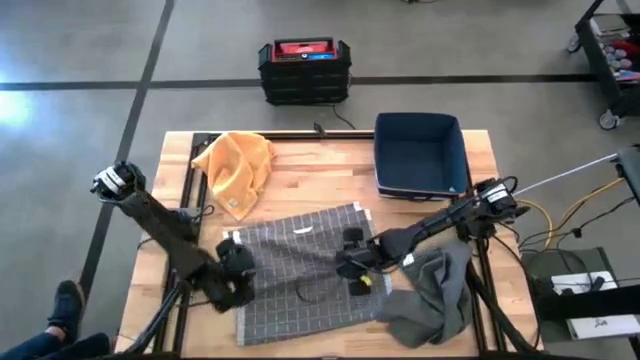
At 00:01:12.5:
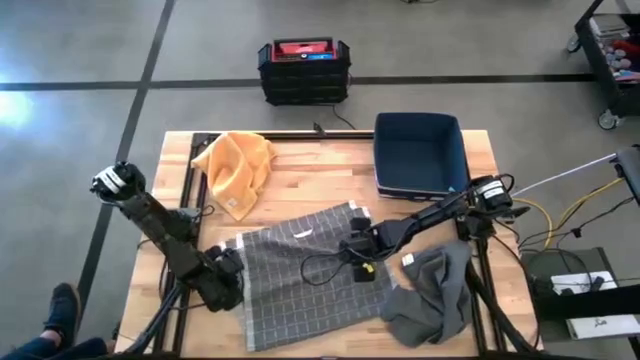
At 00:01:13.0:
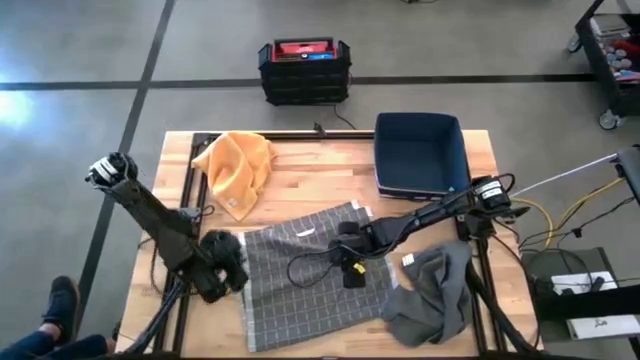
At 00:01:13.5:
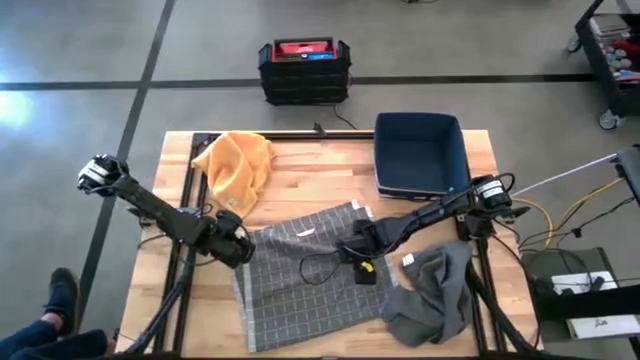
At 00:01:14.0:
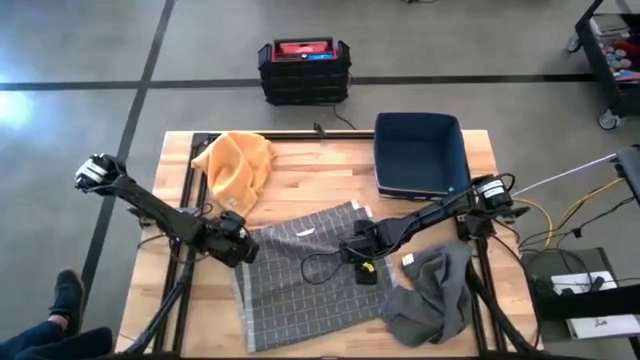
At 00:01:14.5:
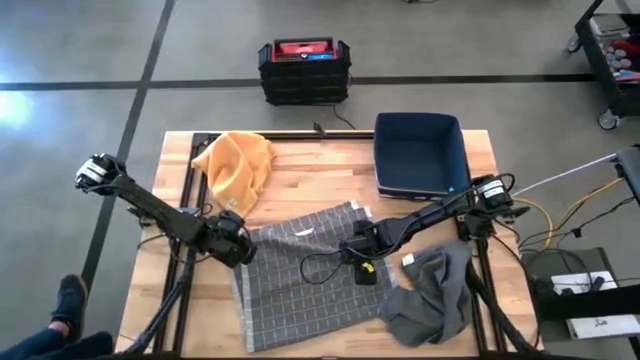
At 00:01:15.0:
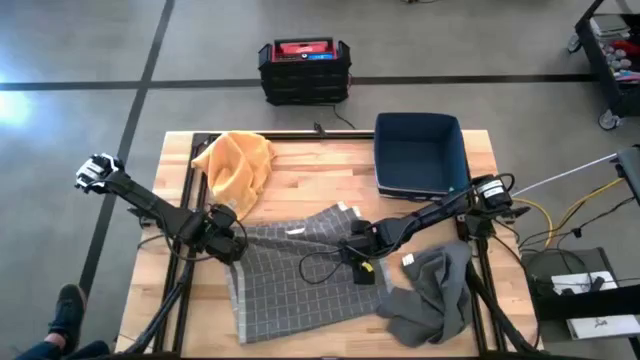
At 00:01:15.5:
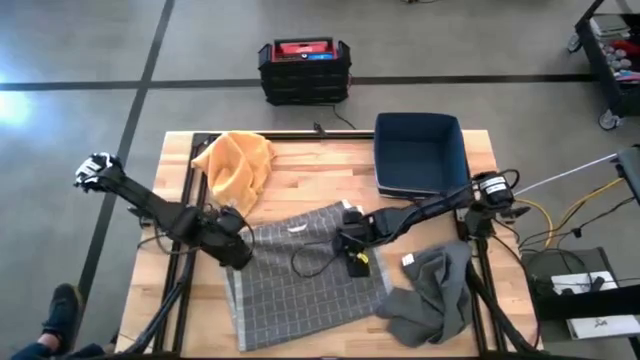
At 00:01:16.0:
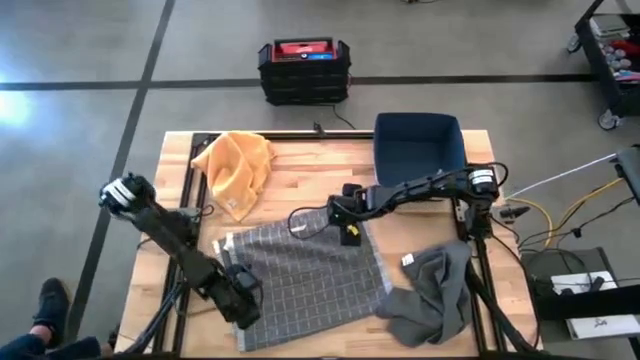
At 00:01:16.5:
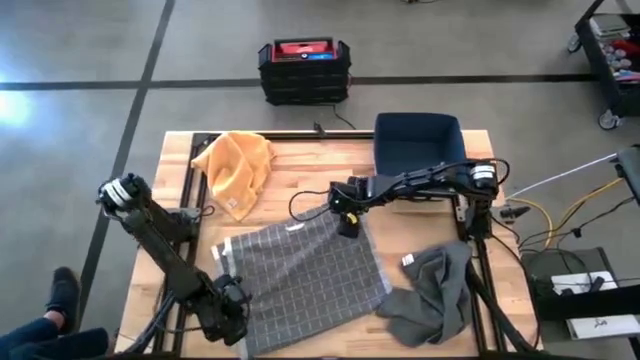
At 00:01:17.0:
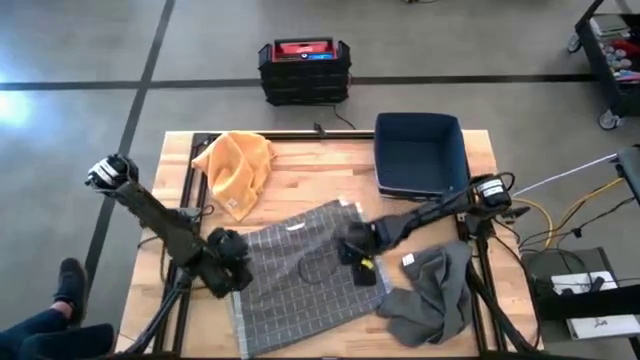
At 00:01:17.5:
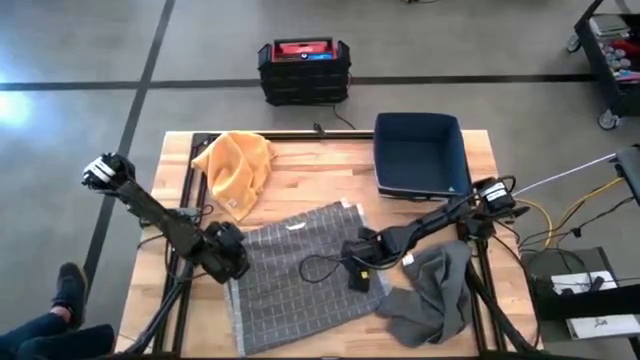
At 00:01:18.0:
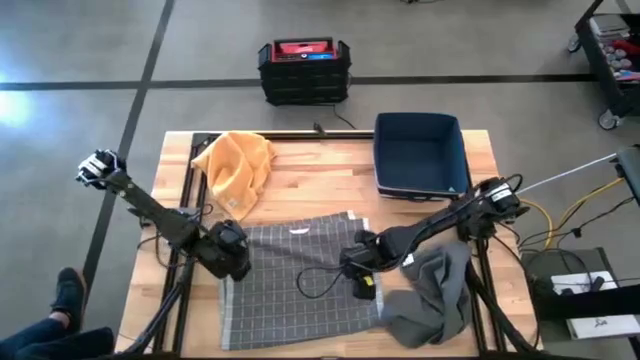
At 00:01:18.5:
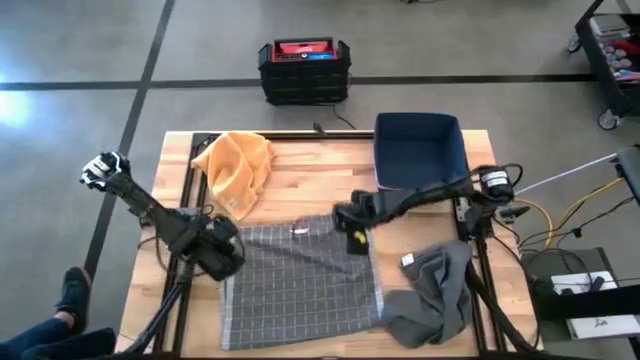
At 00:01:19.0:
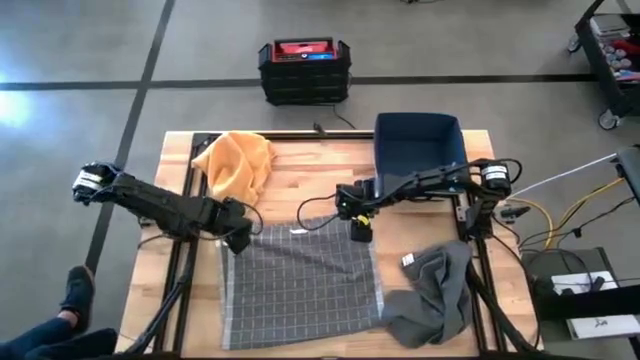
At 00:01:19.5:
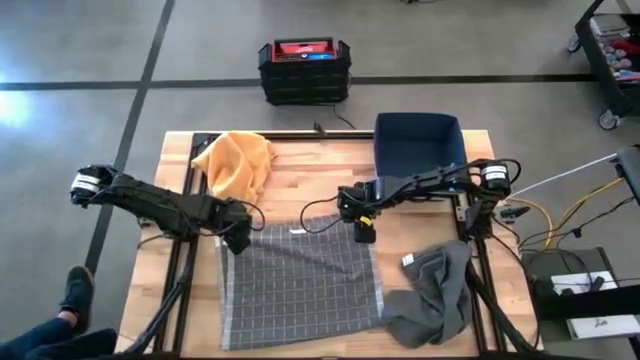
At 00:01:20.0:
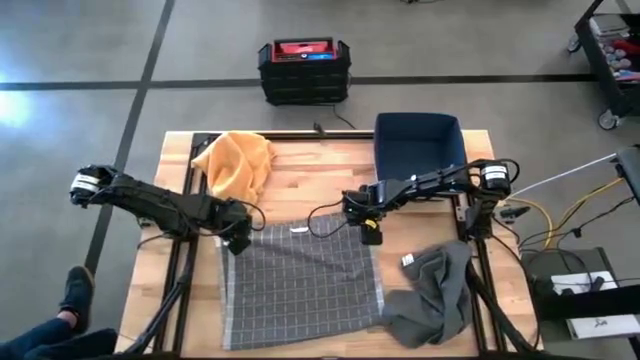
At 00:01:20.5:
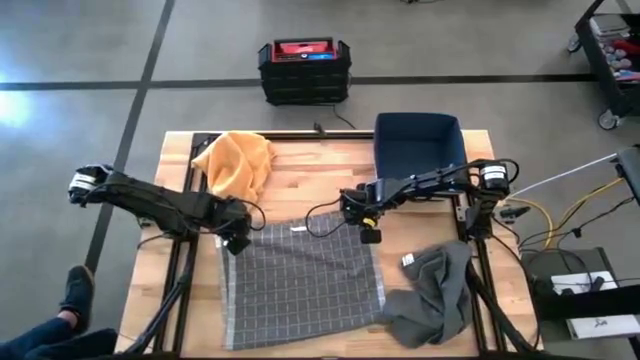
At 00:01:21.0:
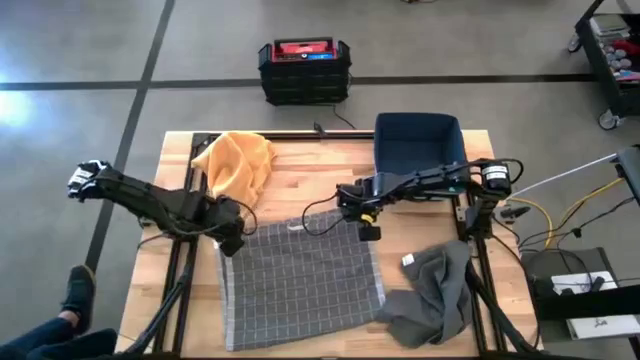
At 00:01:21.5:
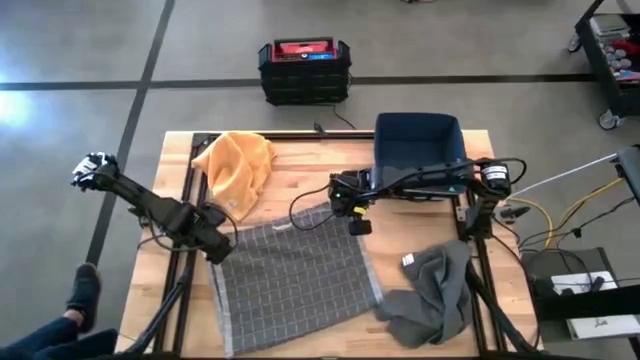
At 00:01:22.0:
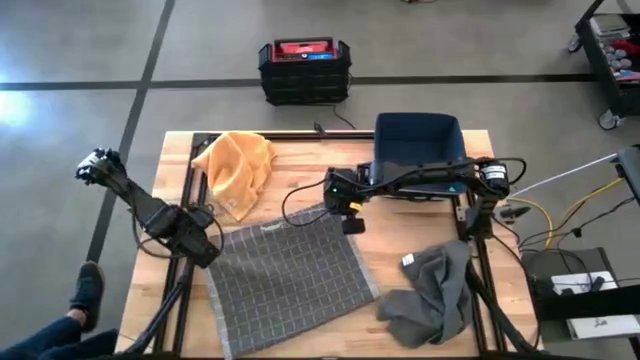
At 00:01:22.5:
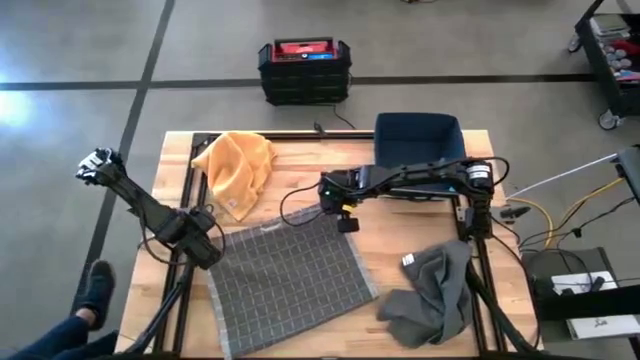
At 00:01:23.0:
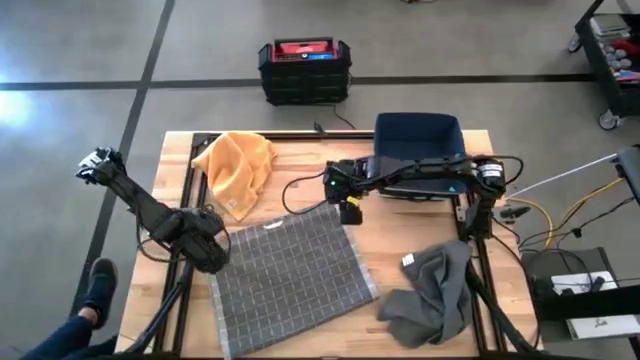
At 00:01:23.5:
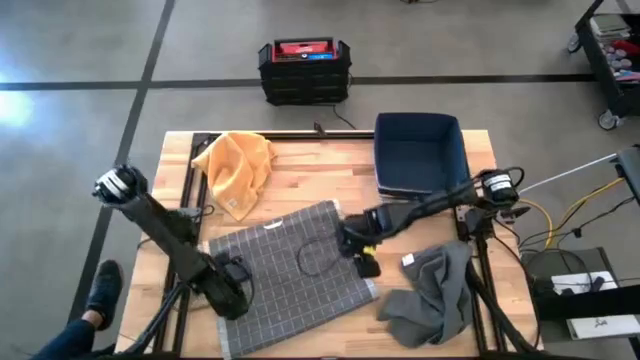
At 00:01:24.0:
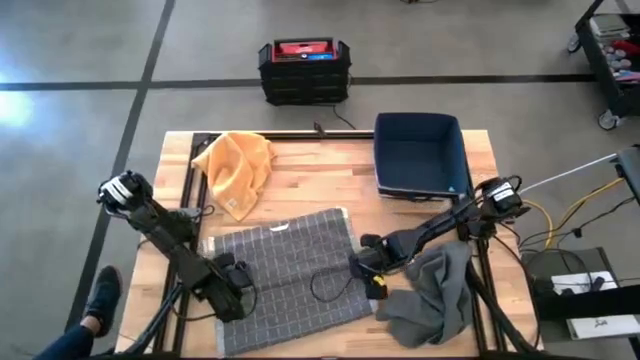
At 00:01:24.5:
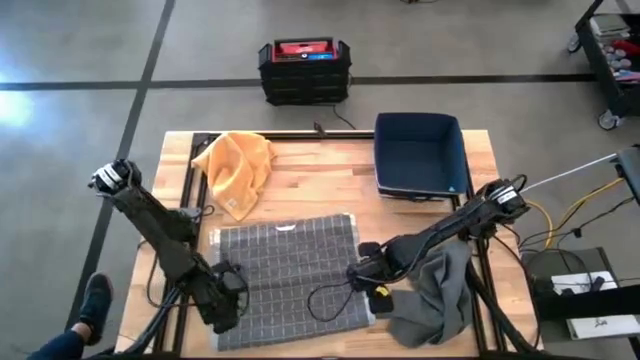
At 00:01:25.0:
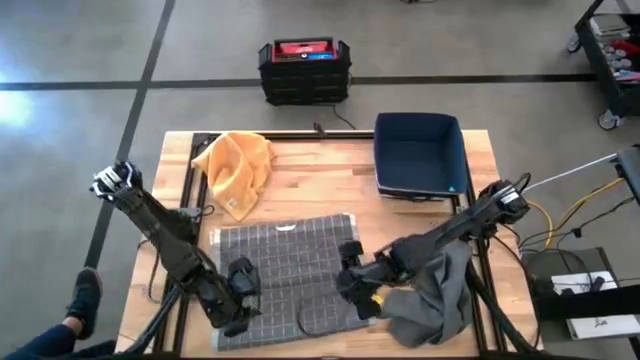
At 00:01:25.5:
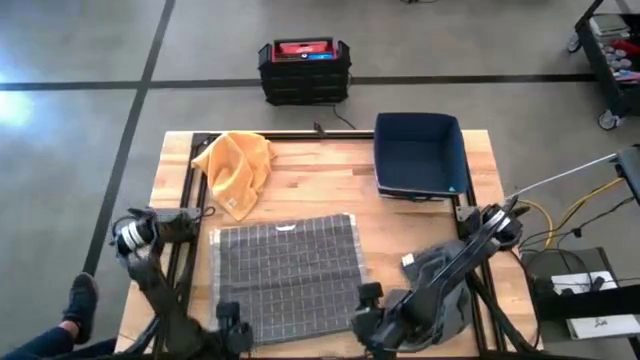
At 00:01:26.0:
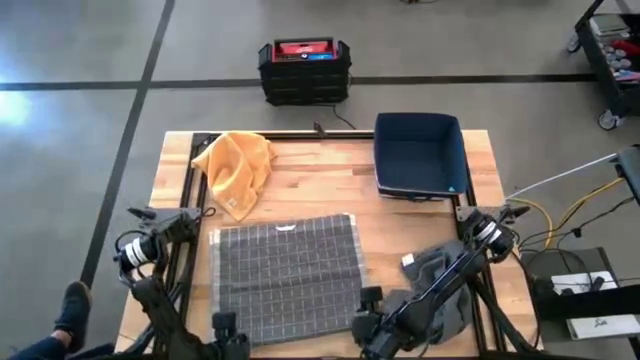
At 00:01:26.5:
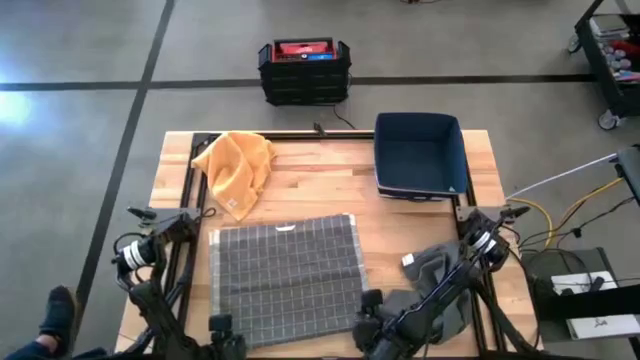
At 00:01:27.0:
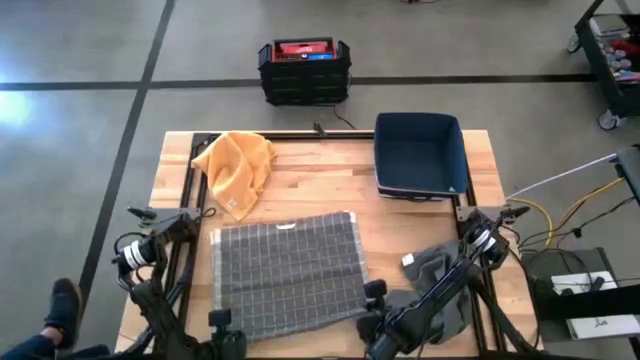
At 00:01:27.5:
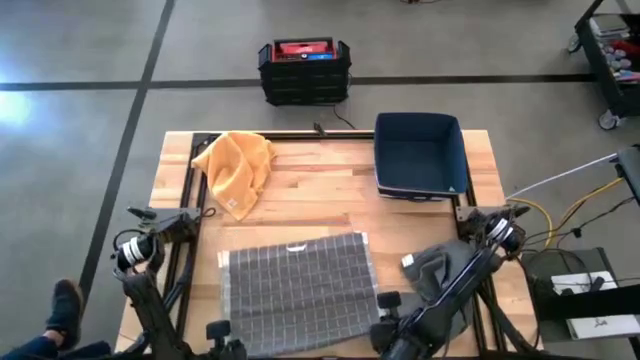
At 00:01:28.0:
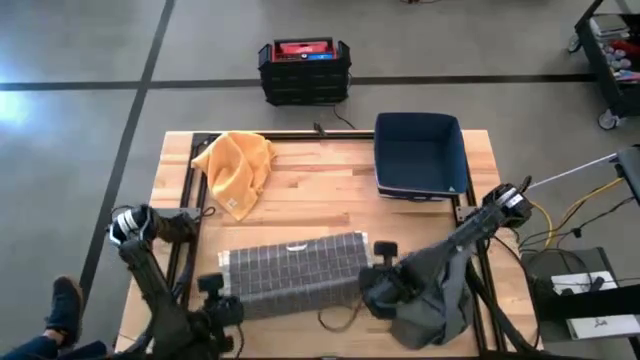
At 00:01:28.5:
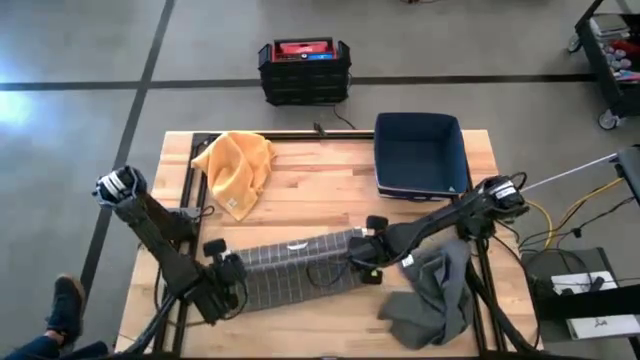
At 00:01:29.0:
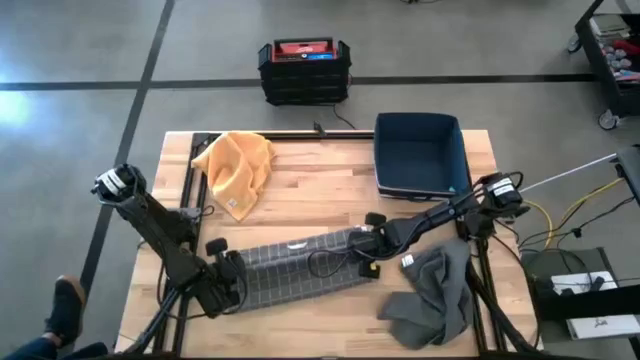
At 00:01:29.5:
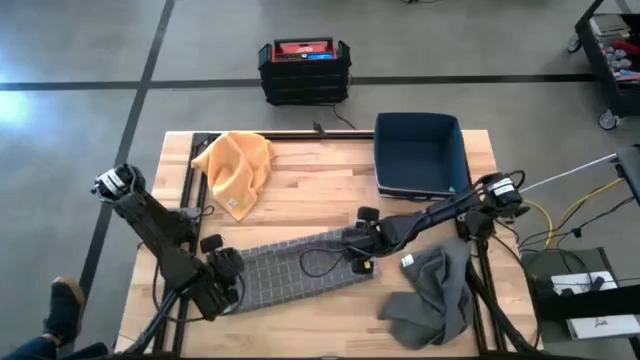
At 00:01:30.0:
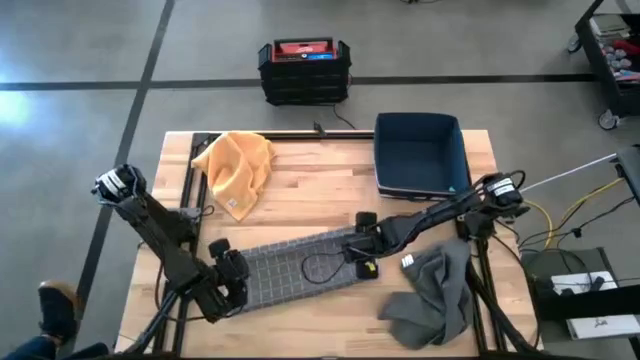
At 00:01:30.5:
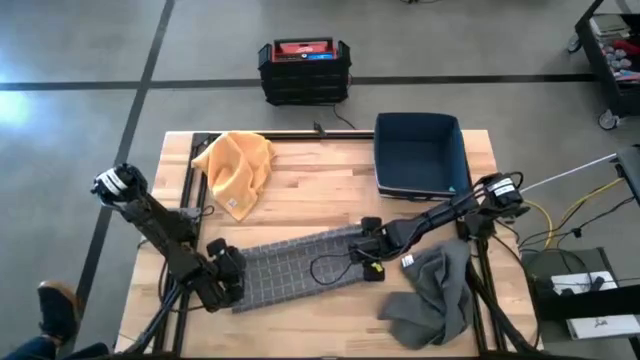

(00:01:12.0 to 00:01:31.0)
Task: Fold towel
Fold the gray patterned kitchen towel

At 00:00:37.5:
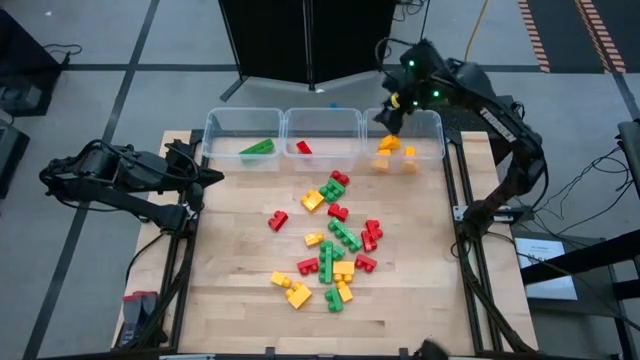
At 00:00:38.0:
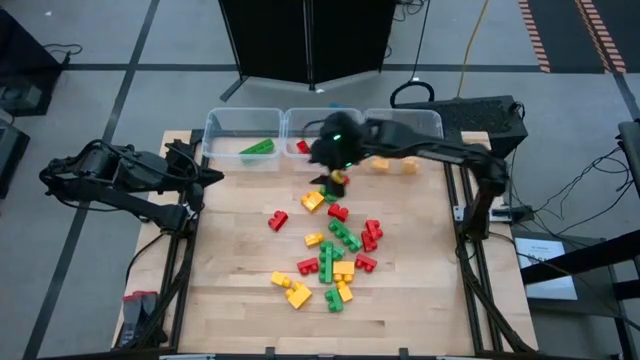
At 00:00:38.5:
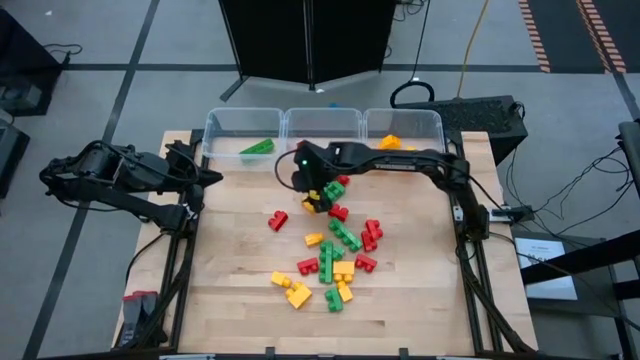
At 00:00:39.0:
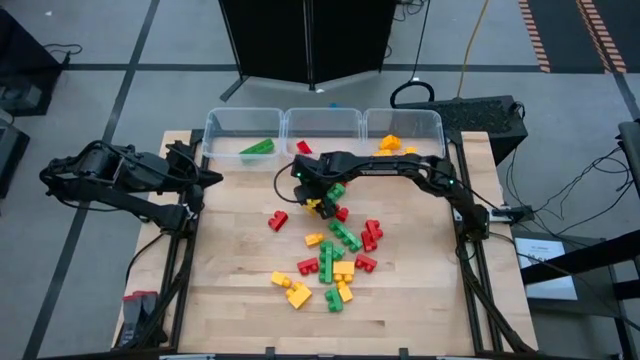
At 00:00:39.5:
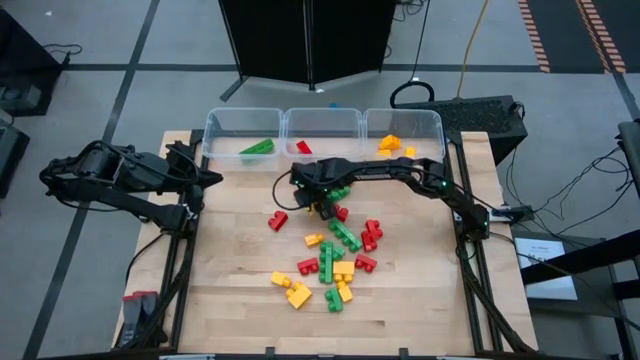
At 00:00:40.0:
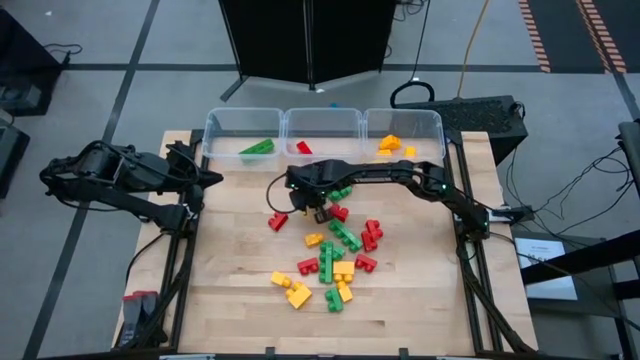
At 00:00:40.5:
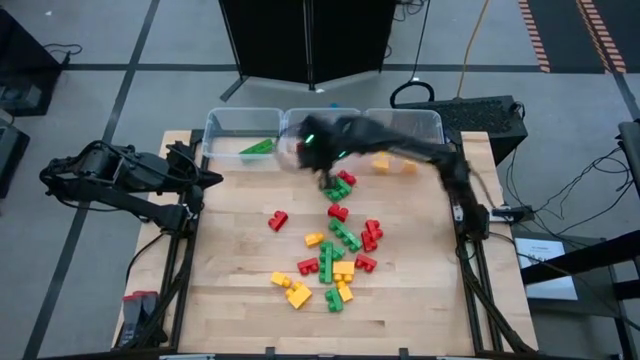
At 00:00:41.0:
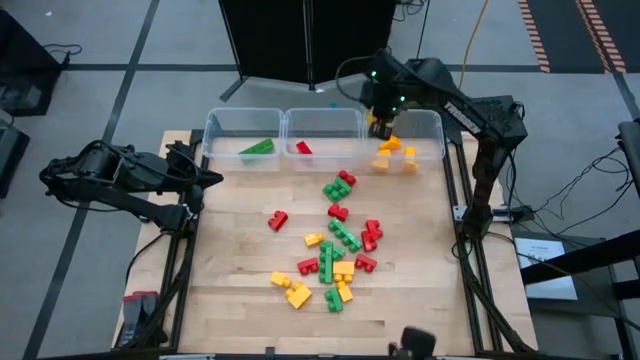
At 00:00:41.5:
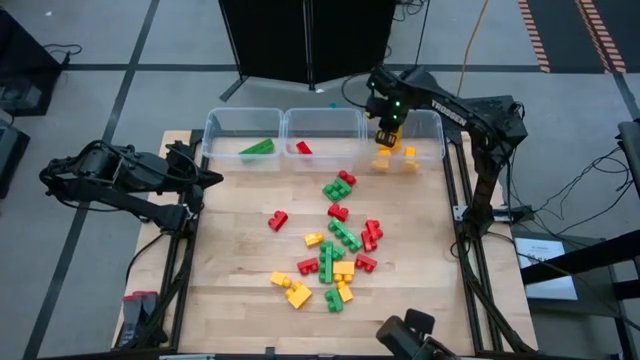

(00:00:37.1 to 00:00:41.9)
Task: Sort blocks
Put the yellow game piece with 2 studs into the right transparent bin
